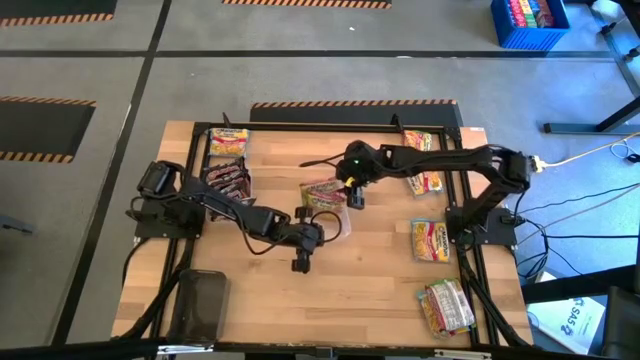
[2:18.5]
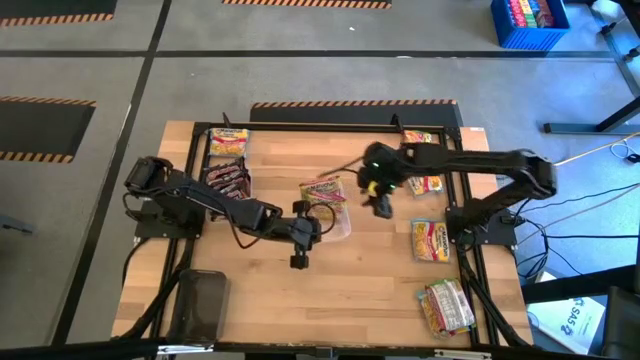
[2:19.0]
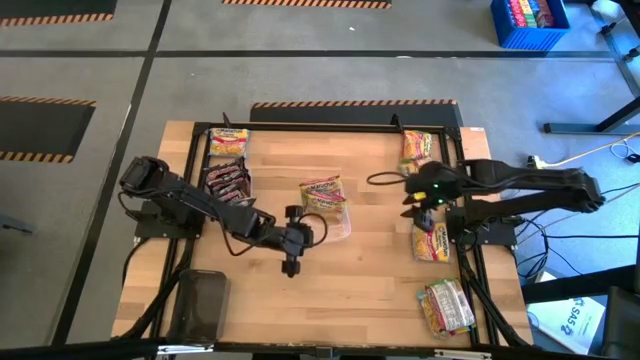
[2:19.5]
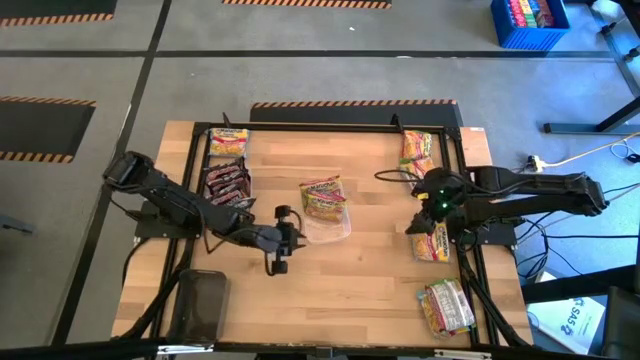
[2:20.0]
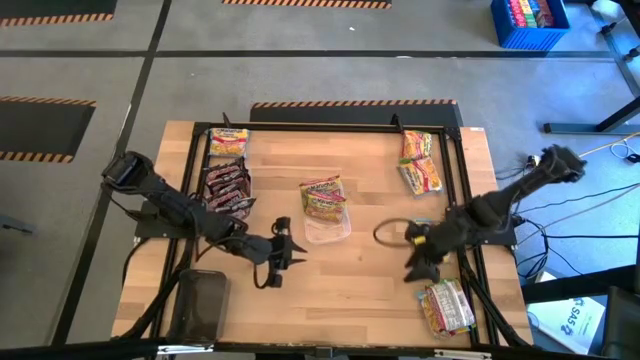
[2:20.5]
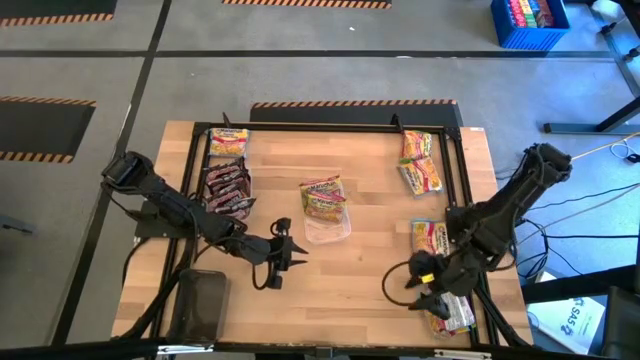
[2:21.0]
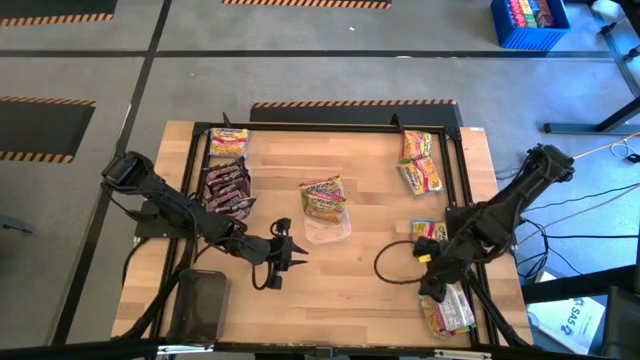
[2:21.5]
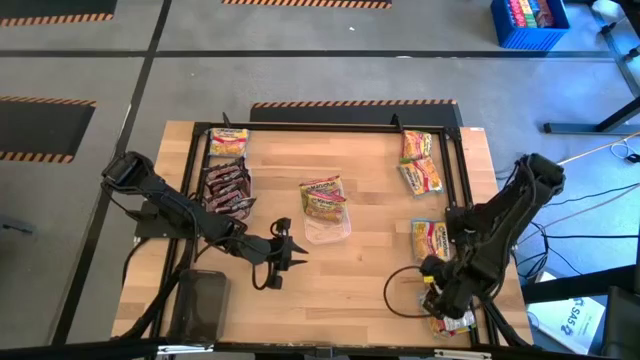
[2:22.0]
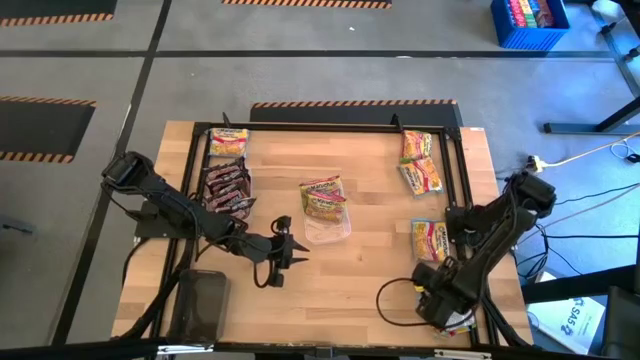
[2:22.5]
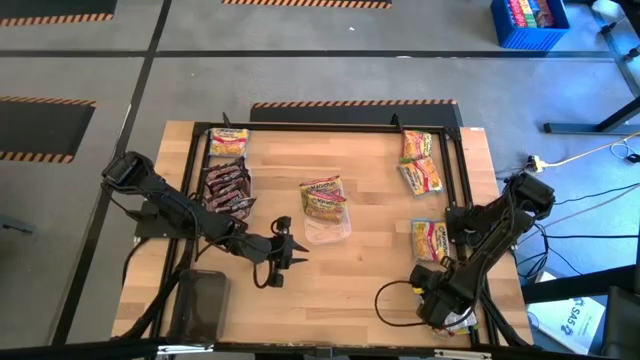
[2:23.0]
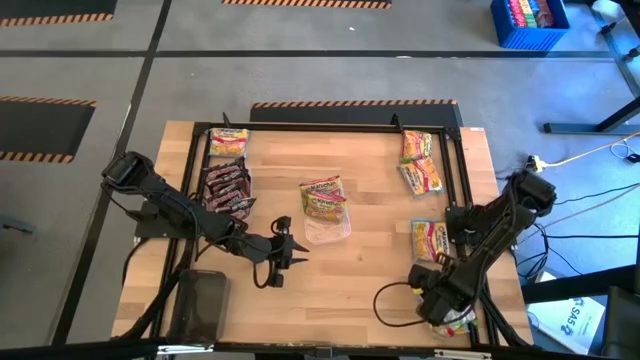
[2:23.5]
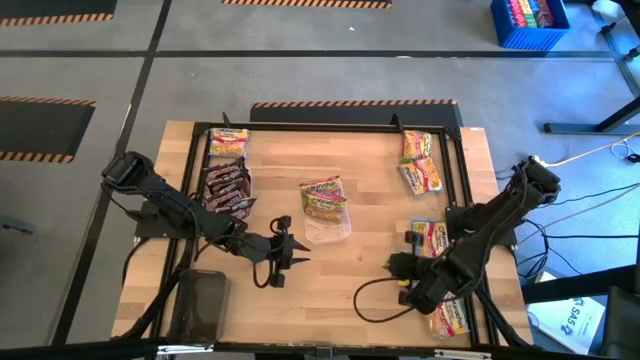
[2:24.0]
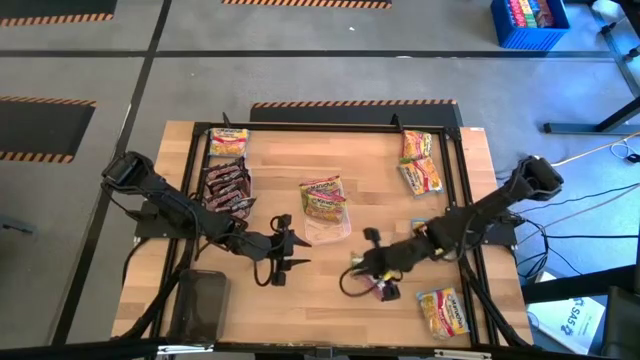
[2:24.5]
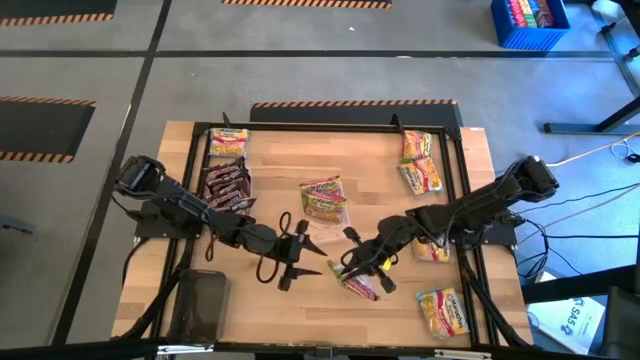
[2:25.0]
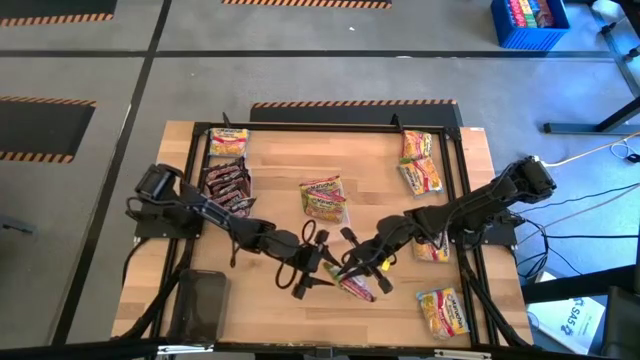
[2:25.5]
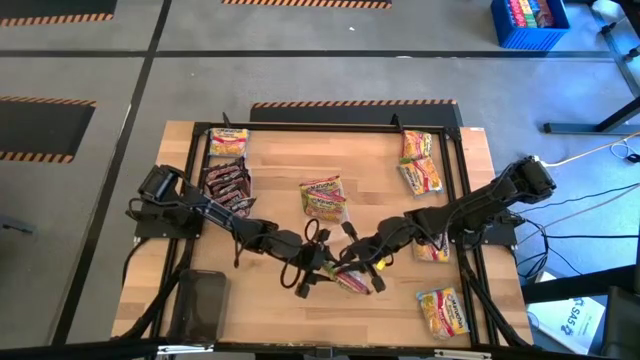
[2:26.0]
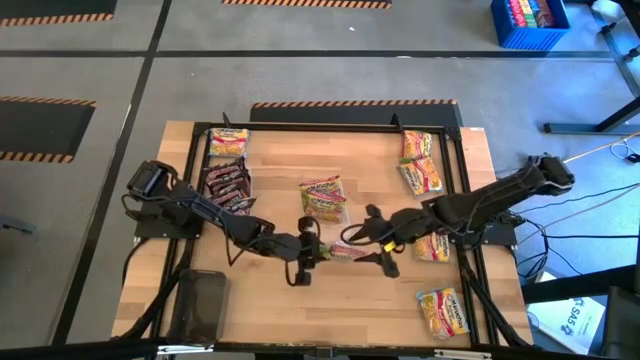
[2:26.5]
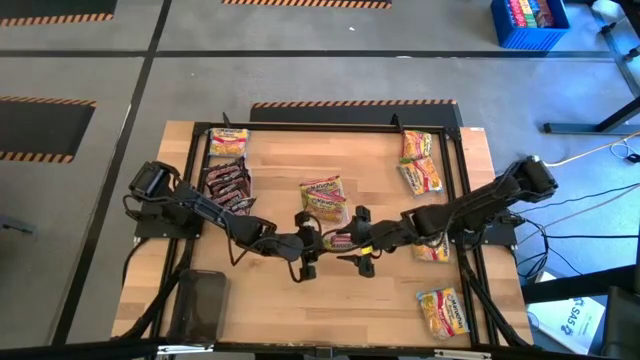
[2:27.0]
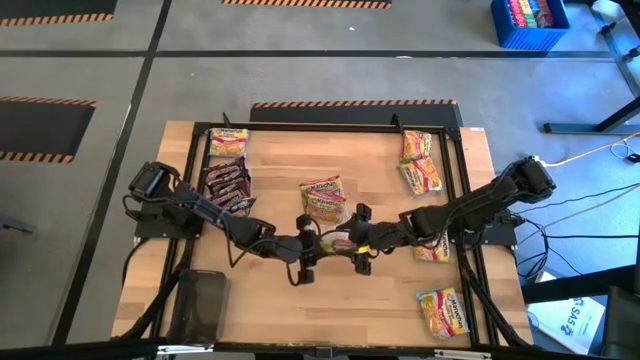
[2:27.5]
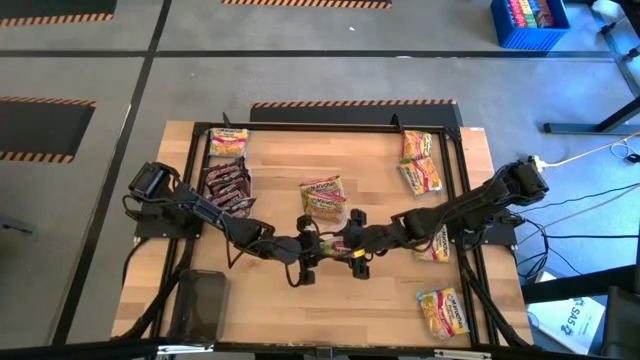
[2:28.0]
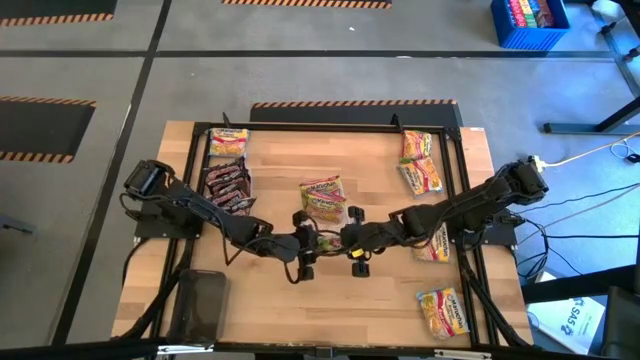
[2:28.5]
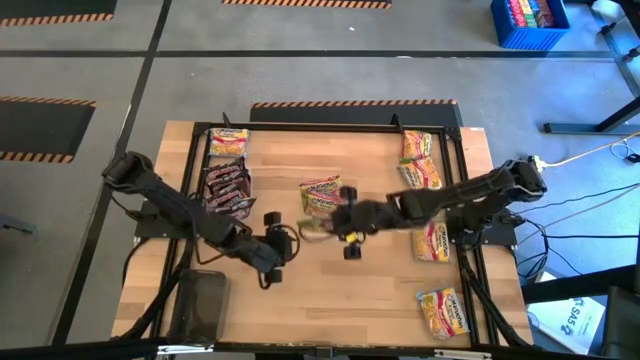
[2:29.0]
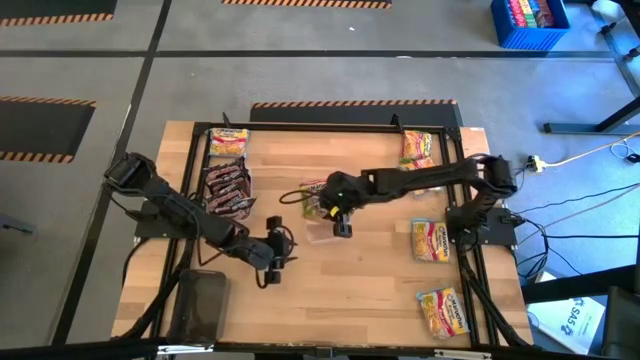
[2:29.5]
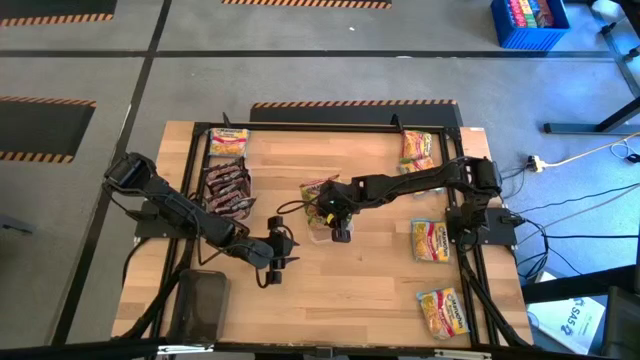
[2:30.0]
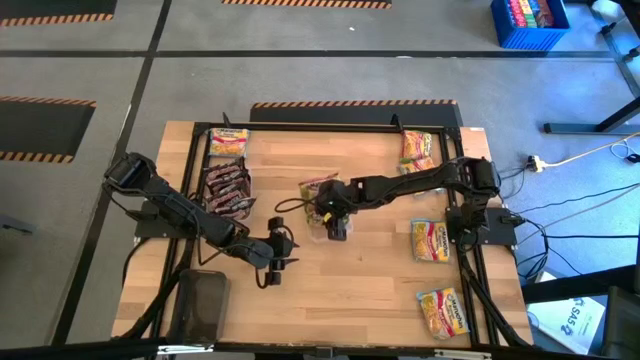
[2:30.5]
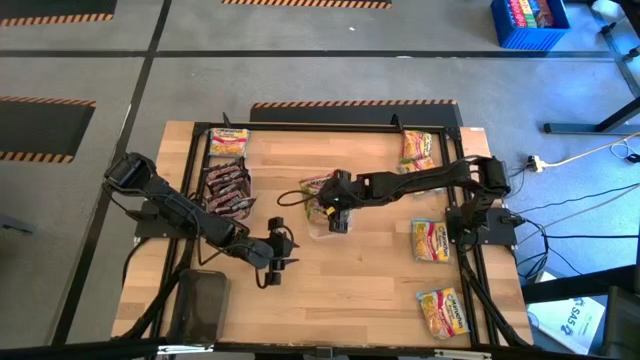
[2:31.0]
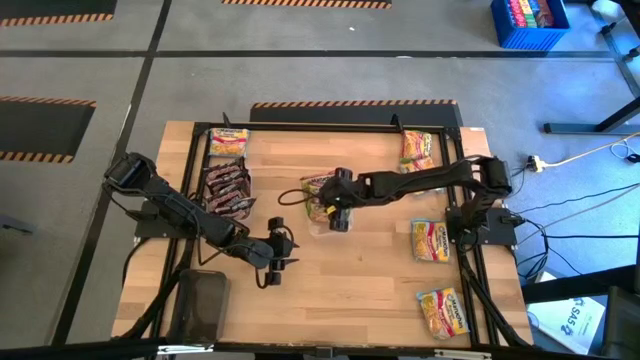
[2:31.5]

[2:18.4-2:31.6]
Task: Sort Maruchan noodles
Put the green noodle pack into the right transparent bin

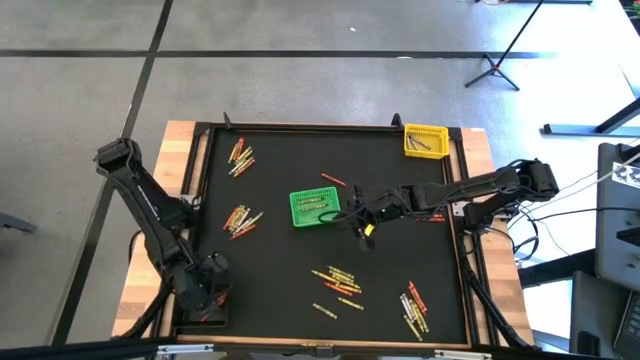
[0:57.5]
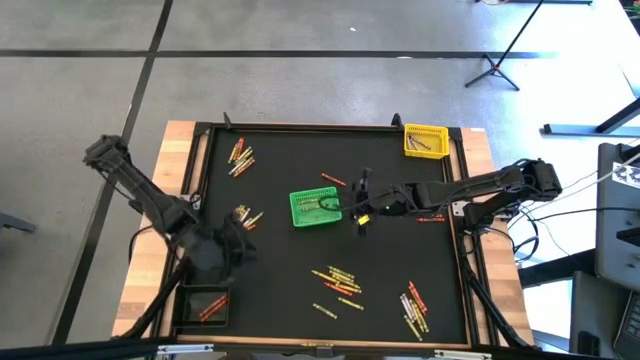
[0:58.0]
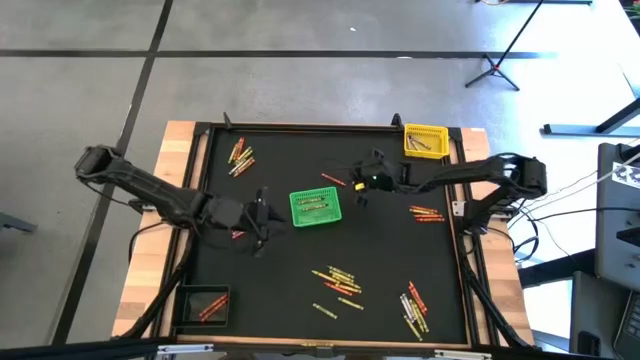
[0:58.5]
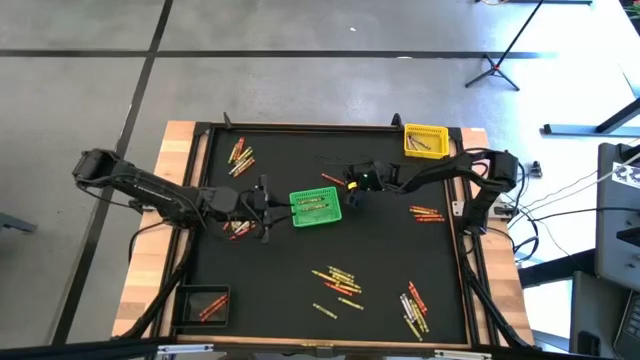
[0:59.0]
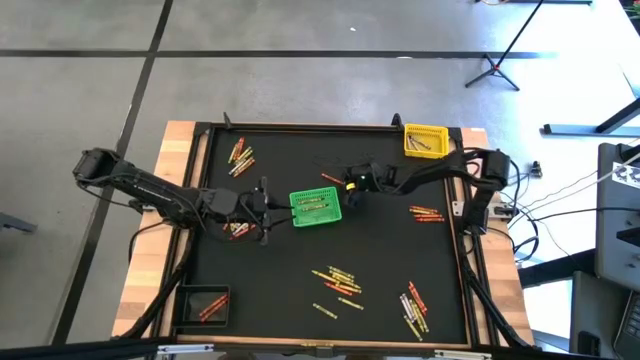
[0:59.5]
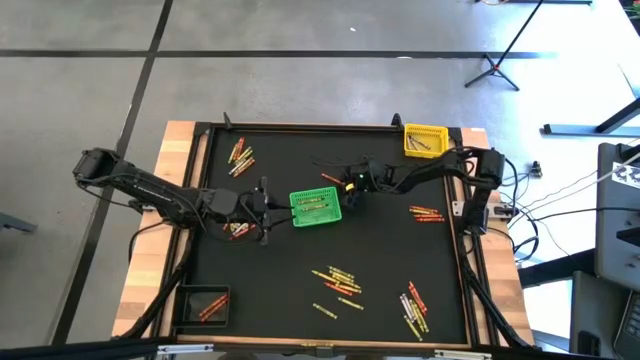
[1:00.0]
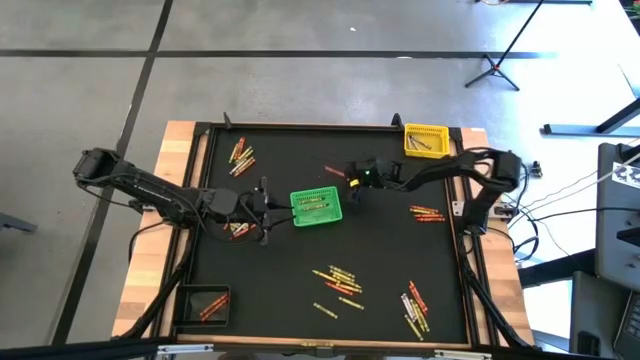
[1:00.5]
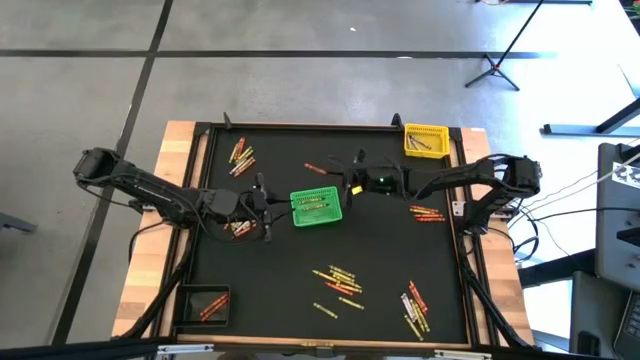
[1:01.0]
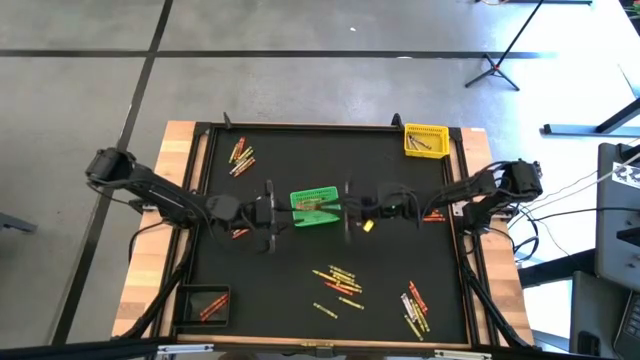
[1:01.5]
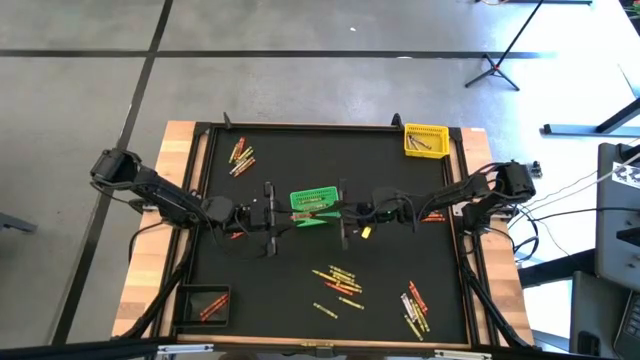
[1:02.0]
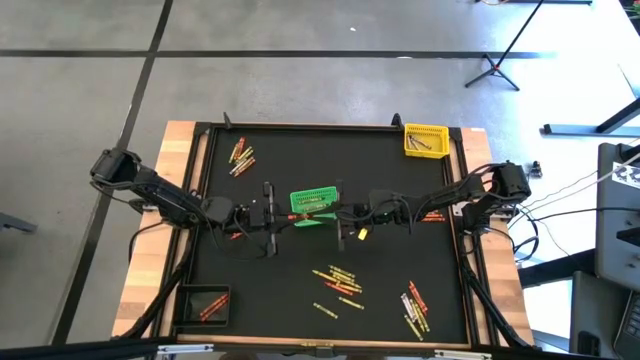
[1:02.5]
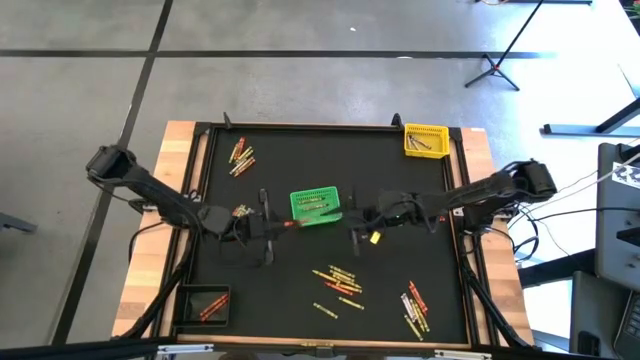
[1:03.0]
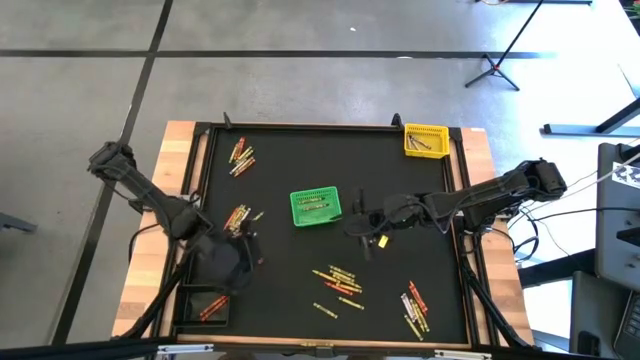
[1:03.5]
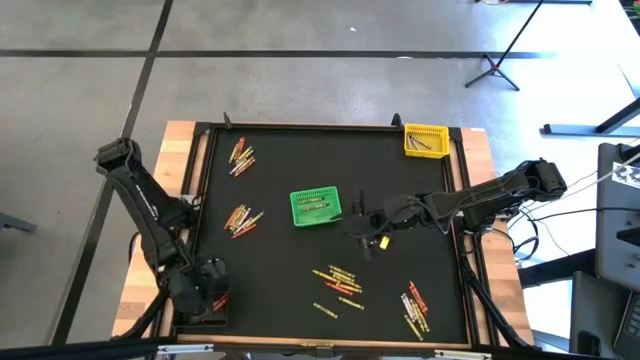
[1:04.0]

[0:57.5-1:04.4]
Task: Sort crayons
Put the orange crayon into the black bin

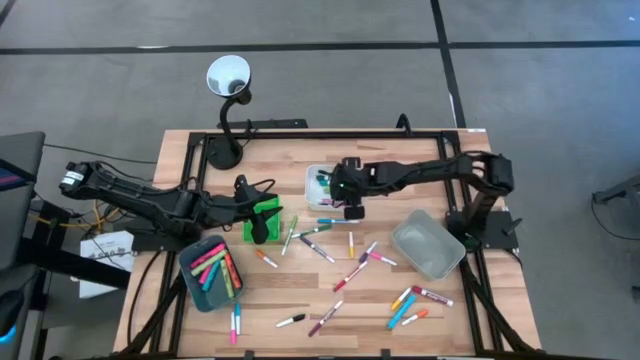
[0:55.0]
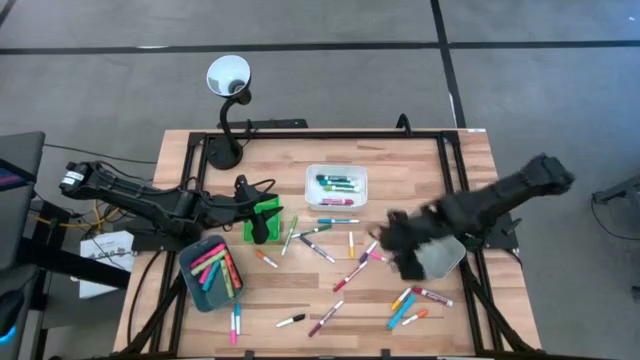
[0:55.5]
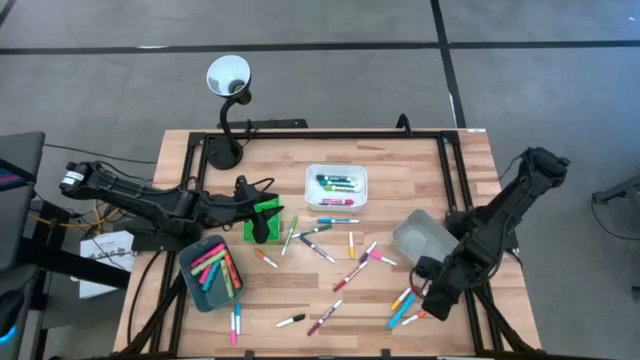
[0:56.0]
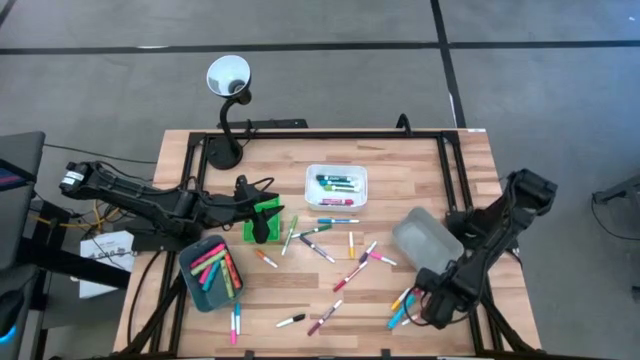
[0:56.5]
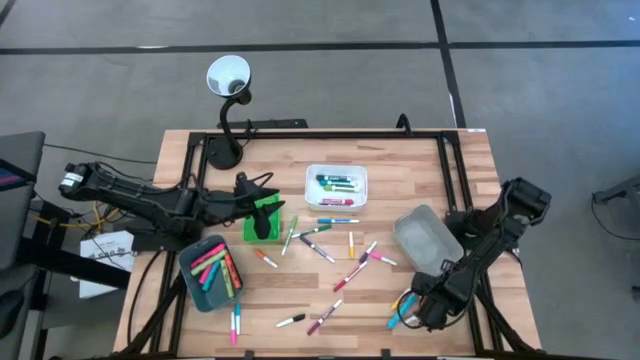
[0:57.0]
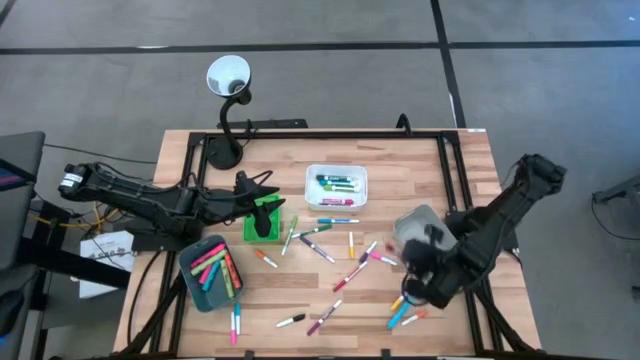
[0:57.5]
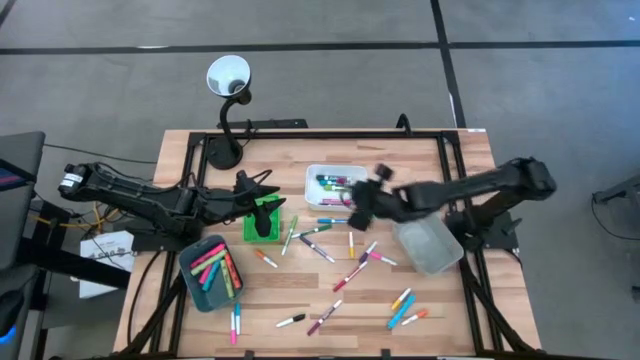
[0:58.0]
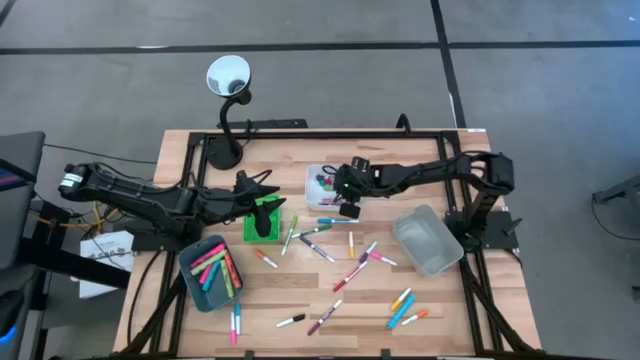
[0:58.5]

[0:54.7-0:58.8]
Task: Pick & Place Markers
Put the big red marker pen into the white bin
